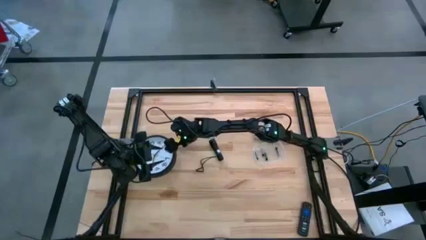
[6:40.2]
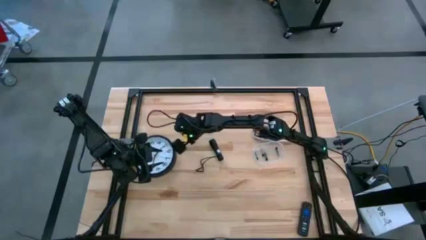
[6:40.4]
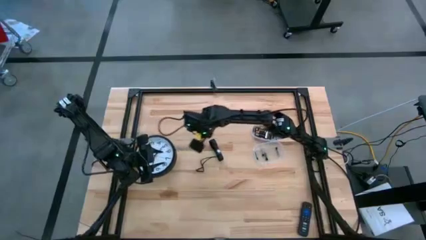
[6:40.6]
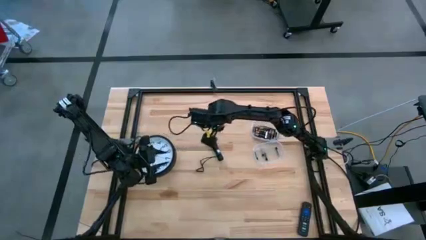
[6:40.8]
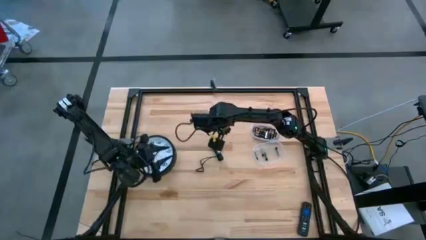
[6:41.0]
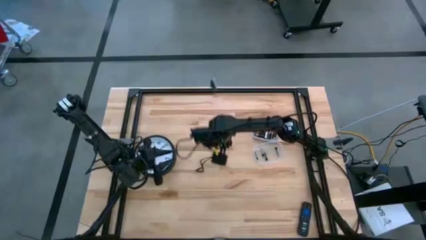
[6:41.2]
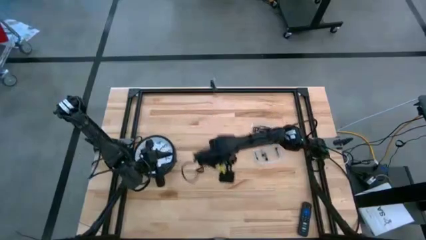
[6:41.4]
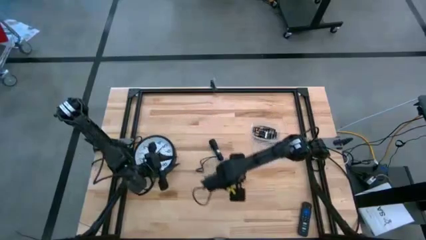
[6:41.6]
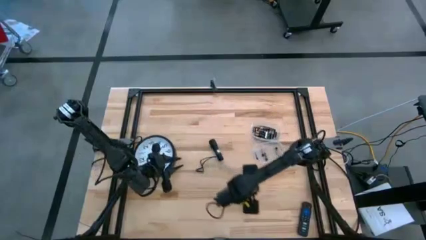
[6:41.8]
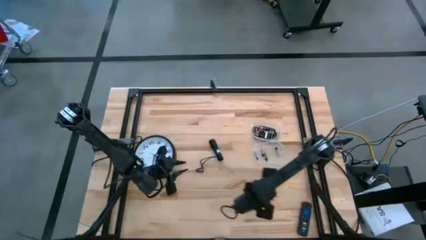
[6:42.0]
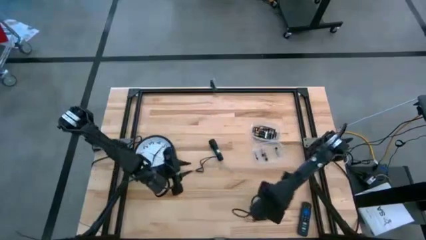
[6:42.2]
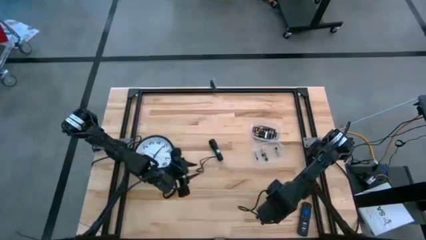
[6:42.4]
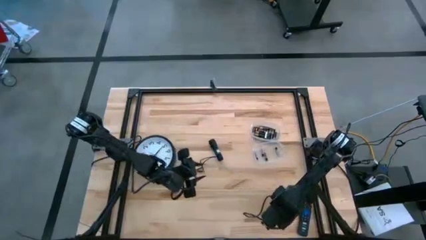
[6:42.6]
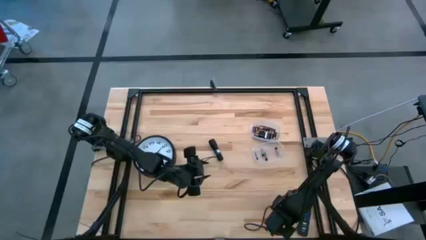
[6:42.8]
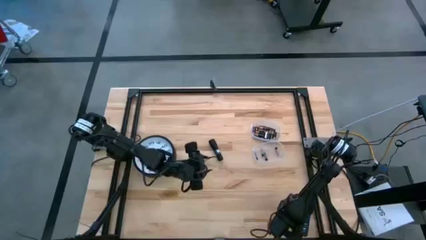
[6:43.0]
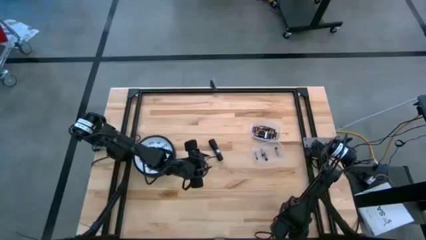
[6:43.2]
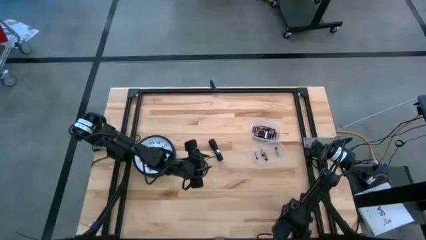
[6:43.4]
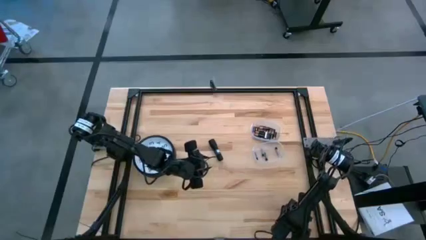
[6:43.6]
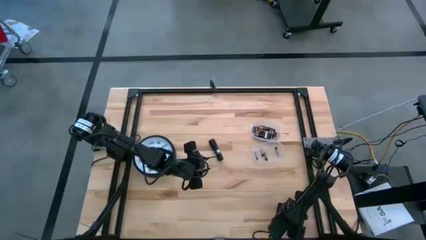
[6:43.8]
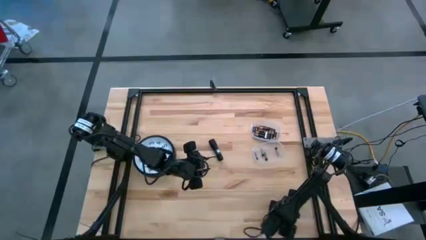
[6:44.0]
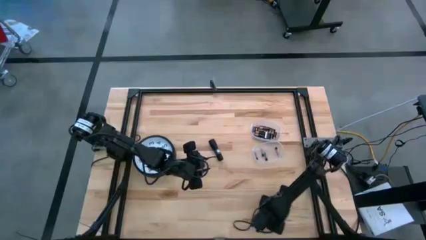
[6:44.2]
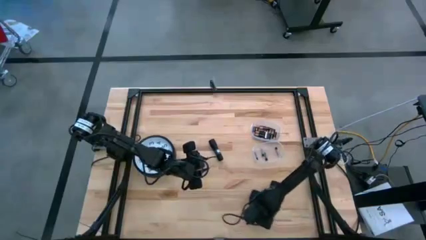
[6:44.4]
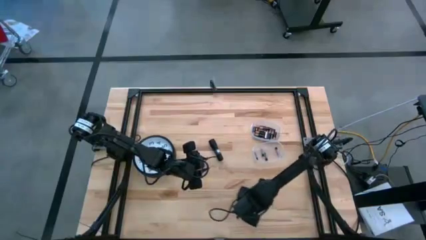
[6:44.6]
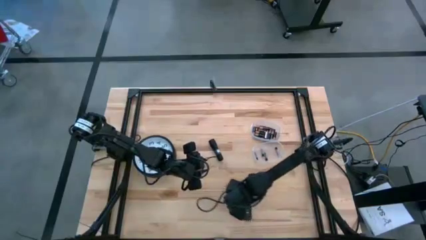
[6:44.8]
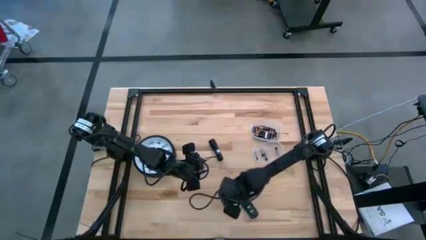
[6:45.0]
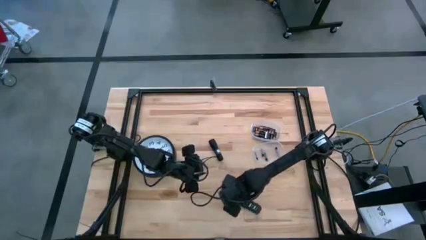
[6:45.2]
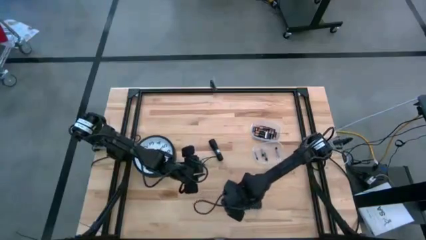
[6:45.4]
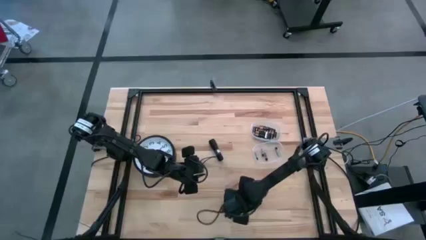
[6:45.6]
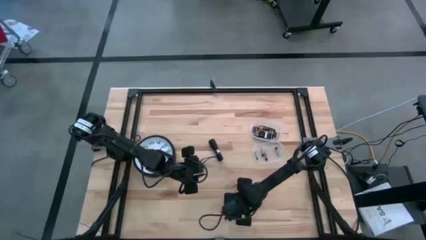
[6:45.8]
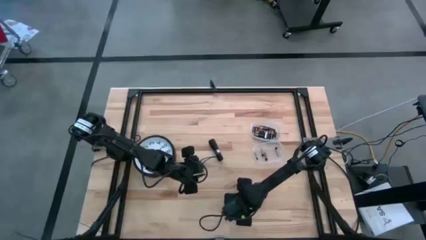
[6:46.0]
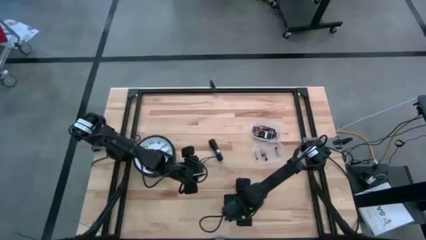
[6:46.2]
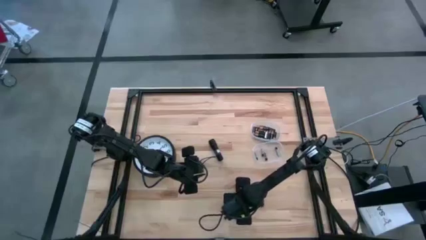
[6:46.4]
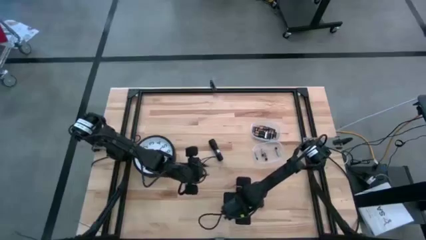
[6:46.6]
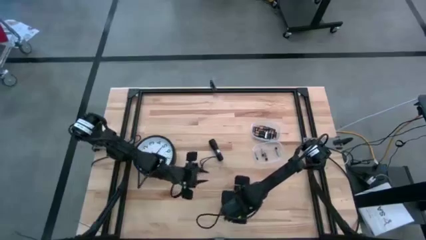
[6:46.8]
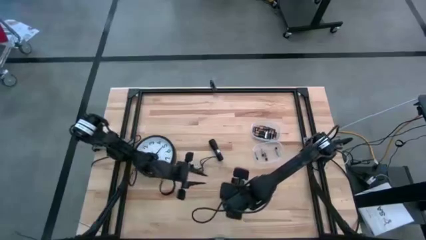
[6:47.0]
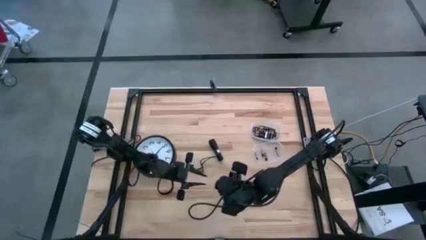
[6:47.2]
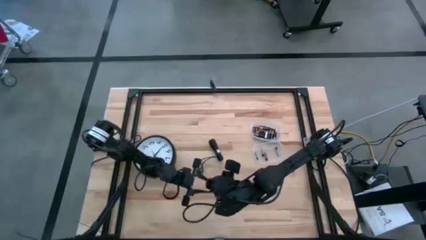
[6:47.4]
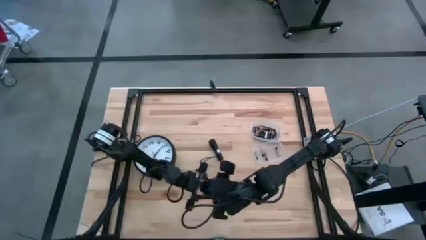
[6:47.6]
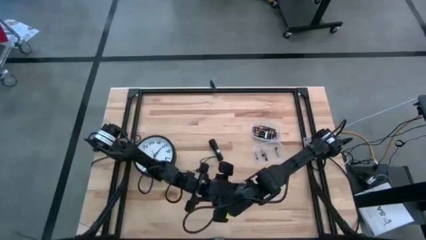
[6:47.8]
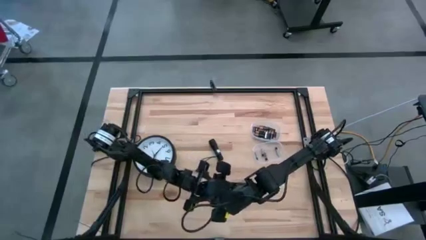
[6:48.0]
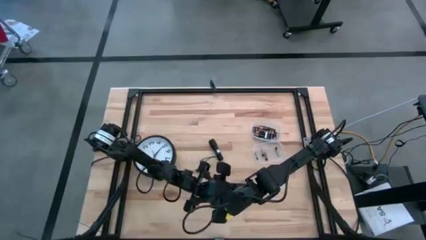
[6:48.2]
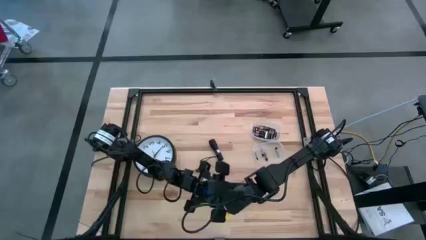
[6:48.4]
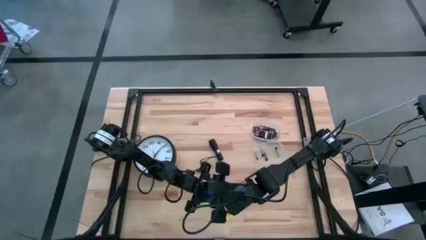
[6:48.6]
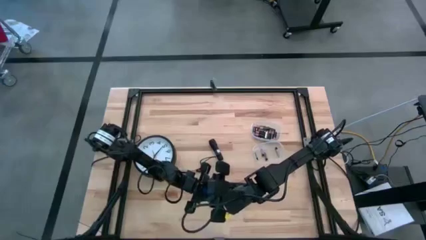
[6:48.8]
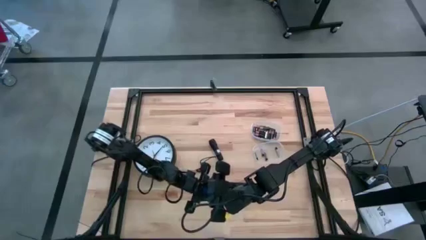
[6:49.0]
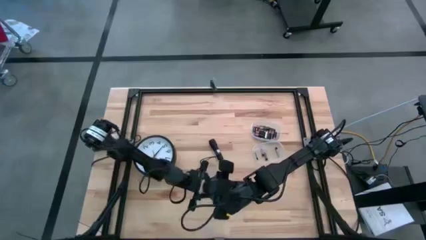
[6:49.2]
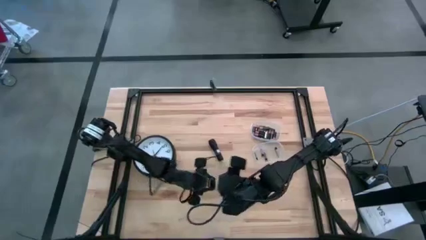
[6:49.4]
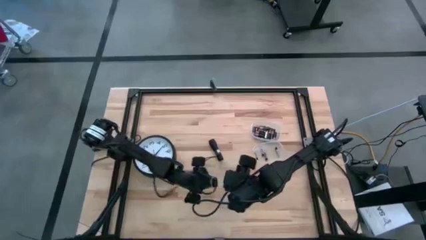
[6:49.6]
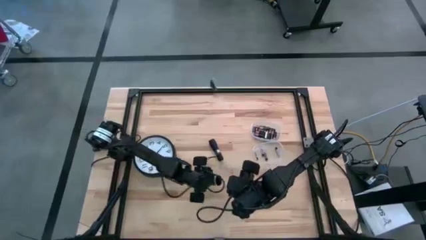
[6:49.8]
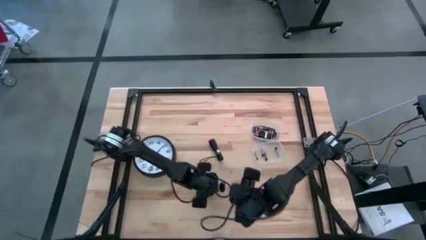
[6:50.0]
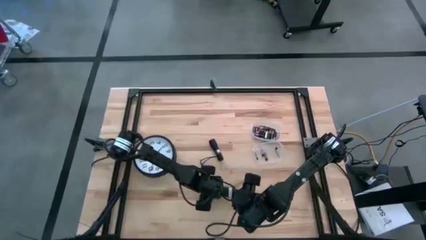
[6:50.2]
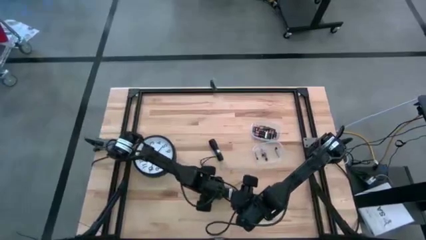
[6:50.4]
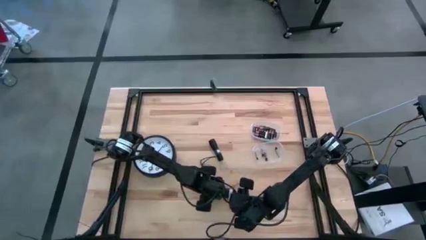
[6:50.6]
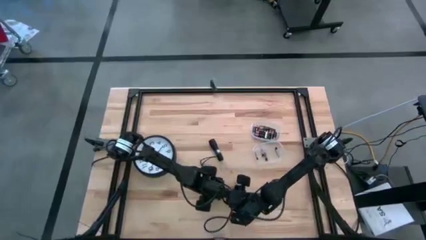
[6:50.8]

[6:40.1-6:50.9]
Task: Insert battery
Remove the black cover of the remote’s battery compartment

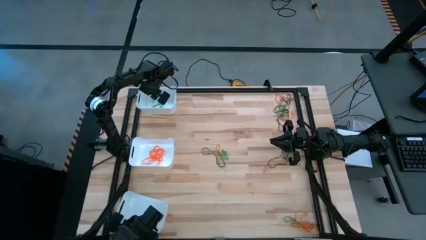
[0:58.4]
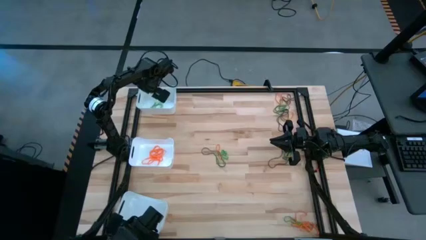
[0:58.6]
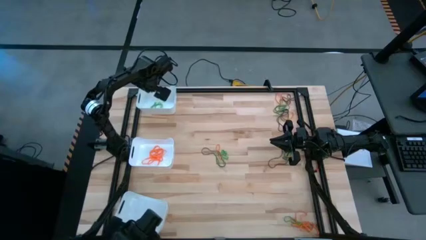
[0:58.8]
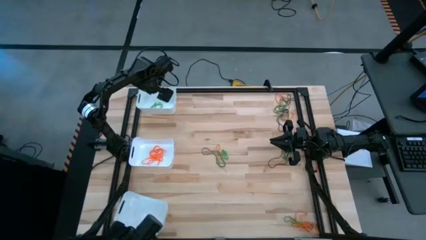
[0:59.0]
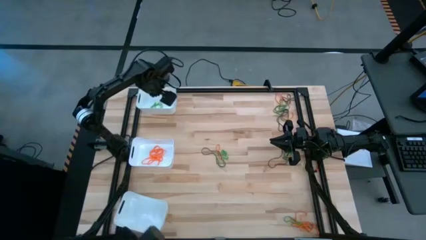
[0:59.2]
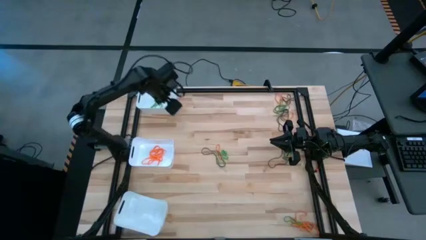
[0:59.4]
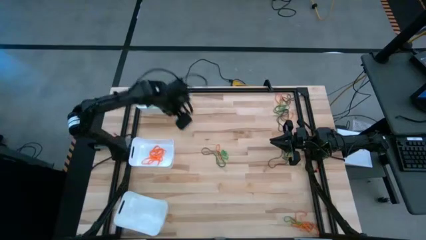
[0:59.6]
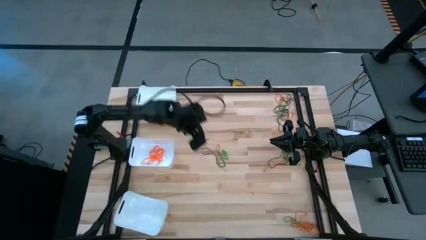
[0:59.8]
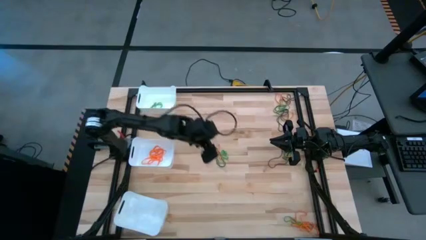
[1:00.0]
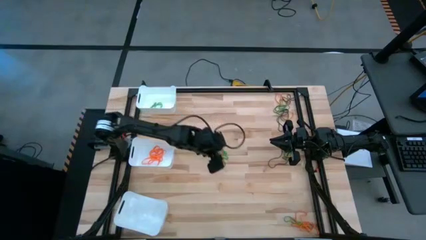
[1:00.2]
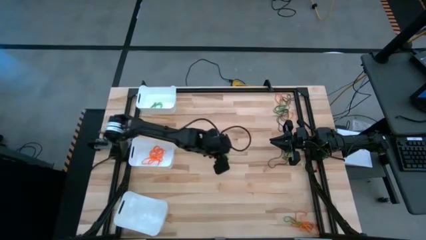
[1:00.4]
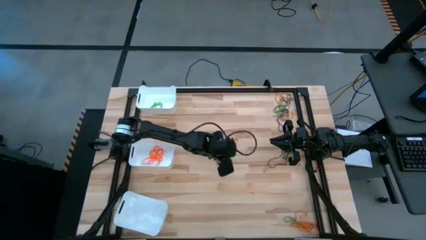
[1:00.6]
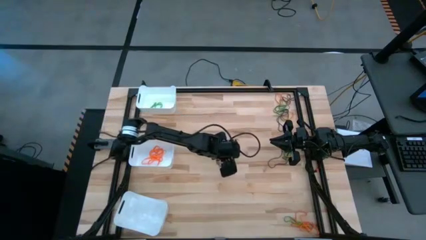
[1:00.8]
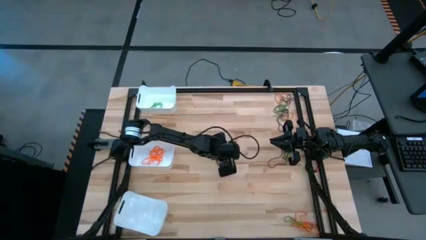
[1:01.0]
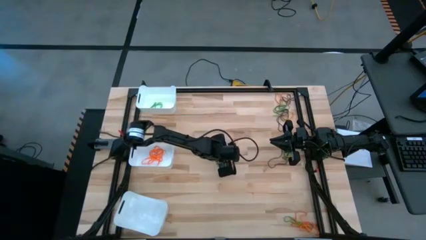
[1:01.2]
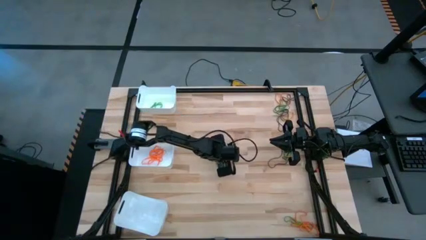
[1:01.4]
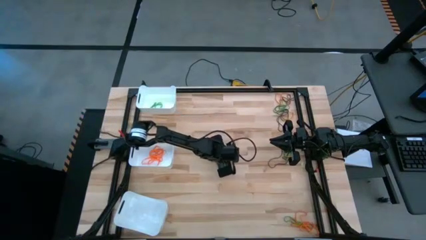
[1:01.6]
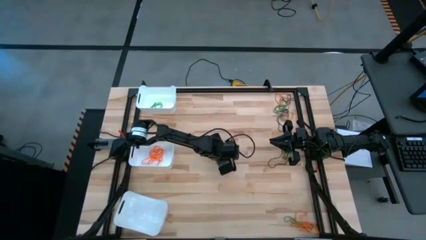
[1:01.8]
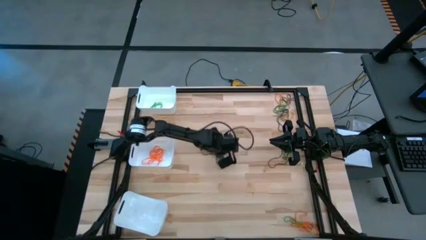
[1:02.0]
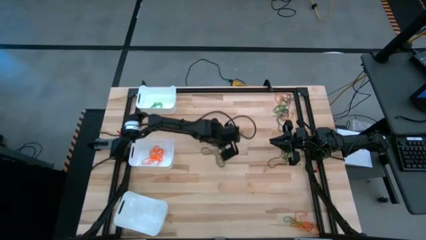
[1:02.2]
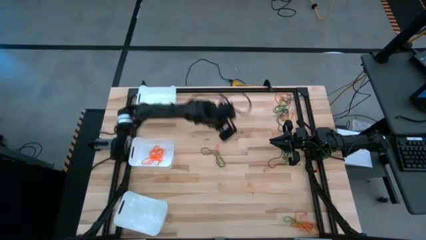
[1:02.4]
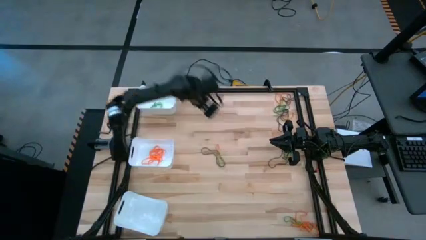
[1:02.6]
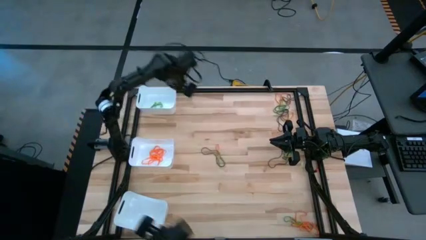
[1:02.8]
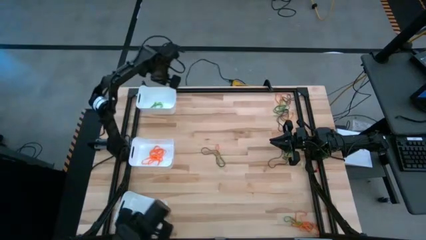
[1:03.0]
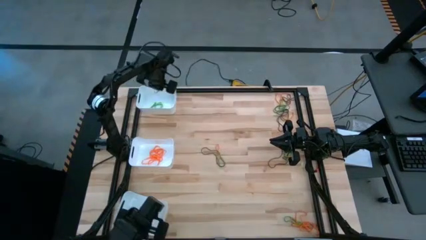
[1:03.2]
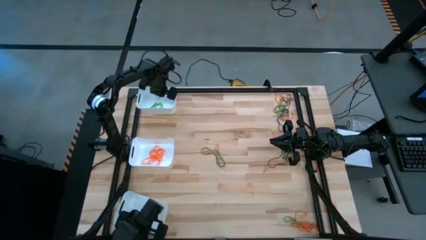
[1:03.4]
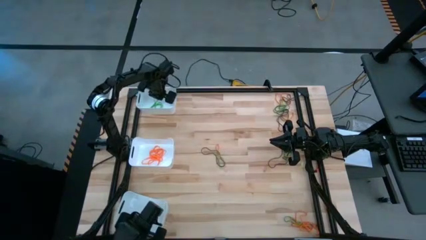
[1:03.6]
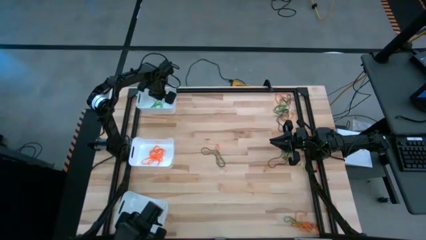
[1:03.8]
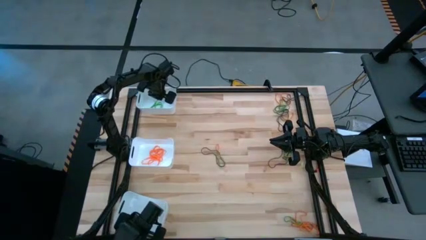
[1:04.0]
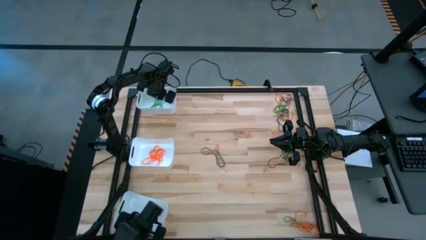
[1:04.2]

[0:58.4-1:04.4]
Task: Sort rubber bands into baskets
Put the green rubber band into the top white bin
